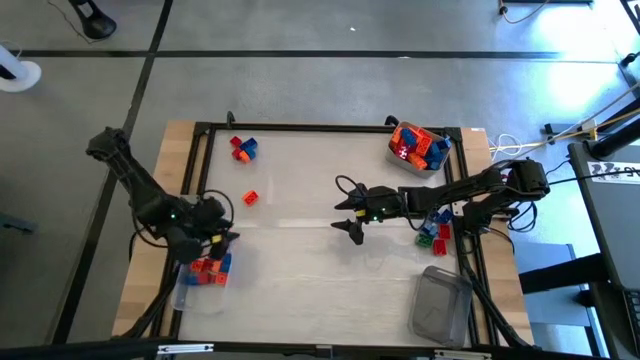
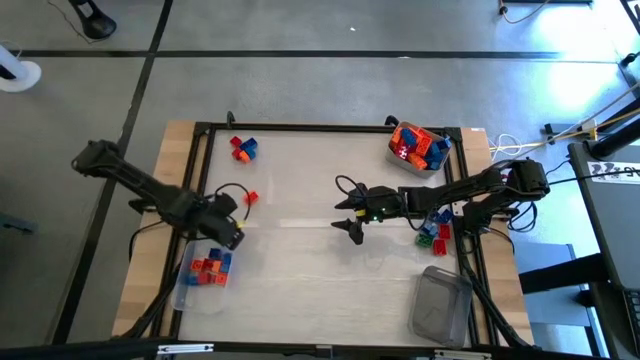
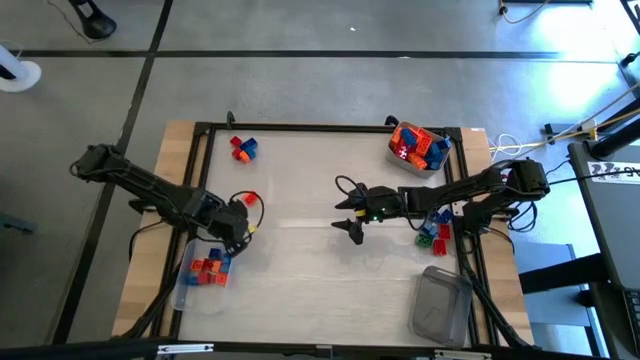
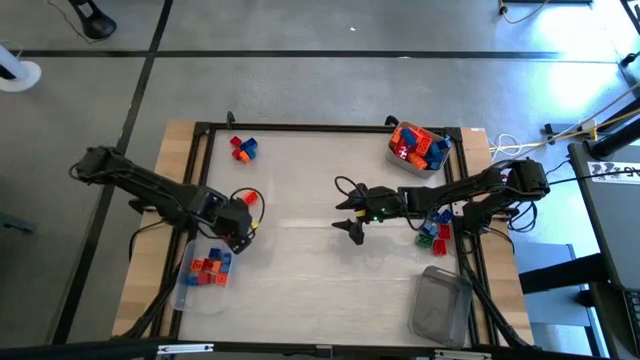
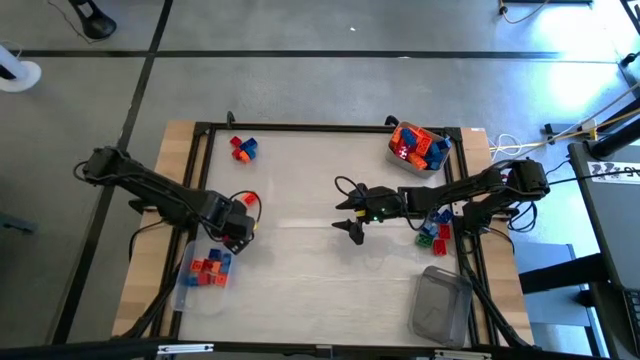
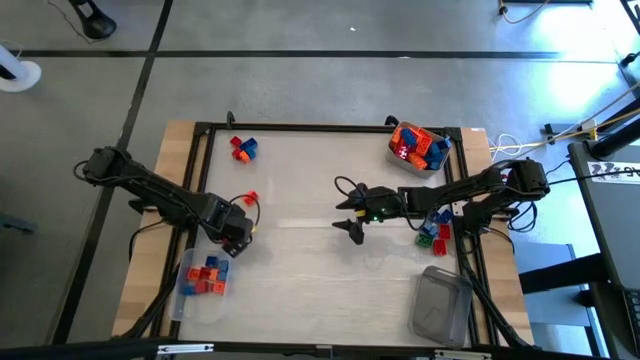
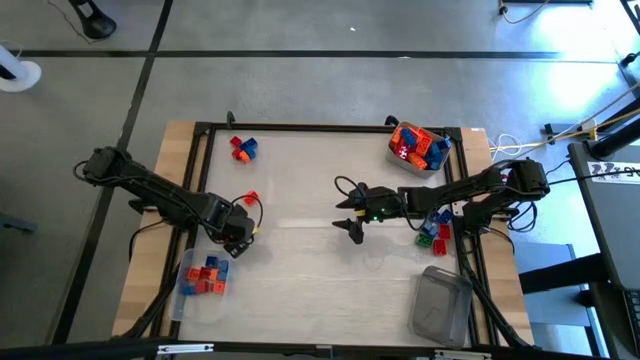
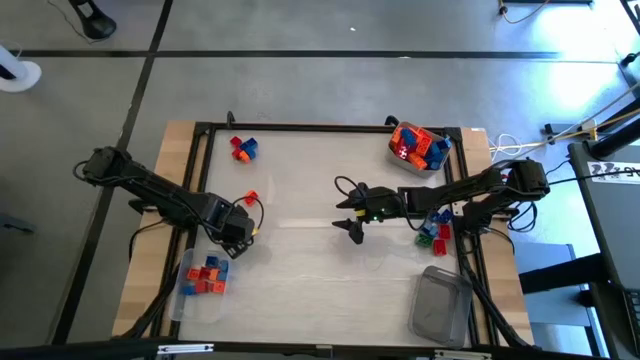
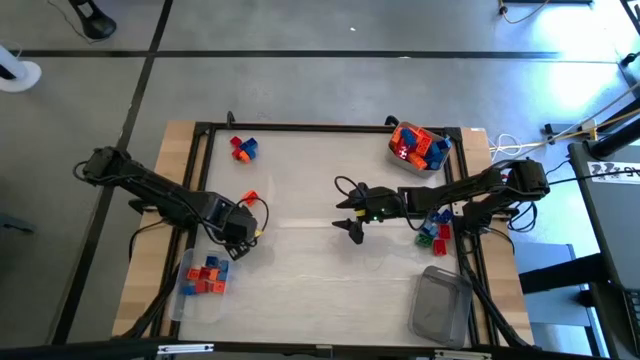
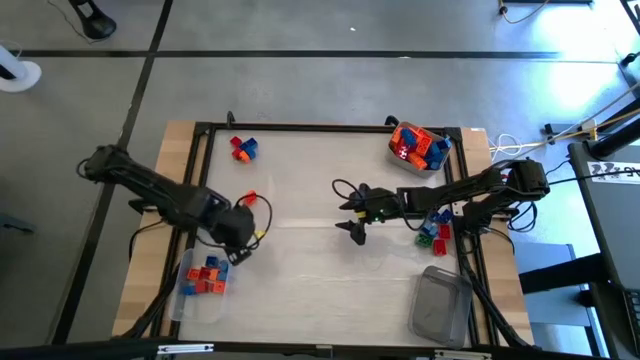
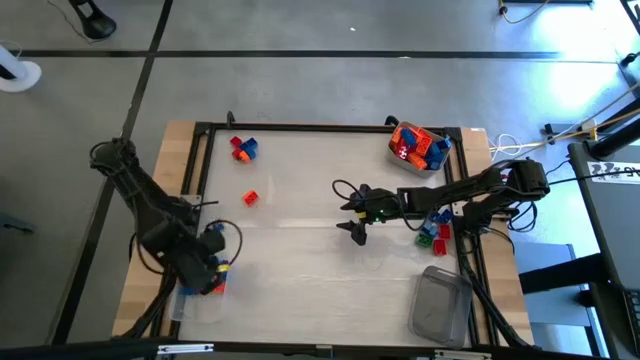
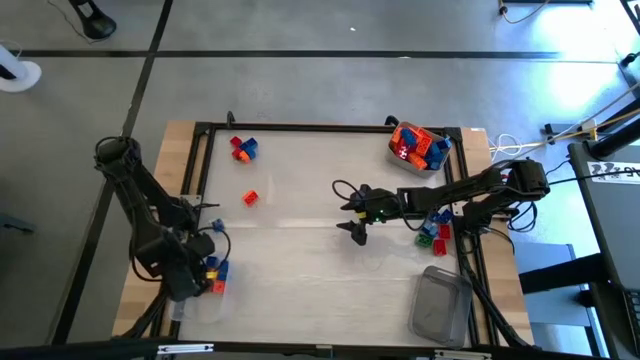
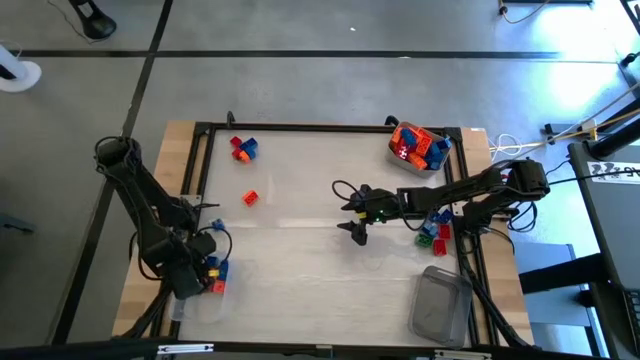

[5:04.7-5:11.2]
Task: Sort blocks by size
Put the red game piece into the transparent bin

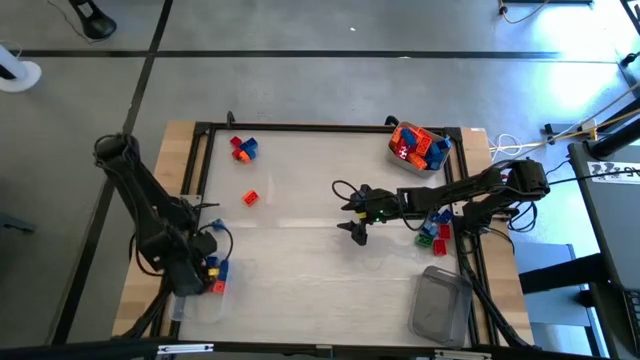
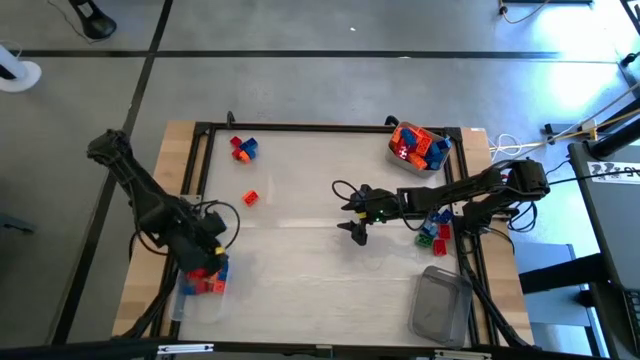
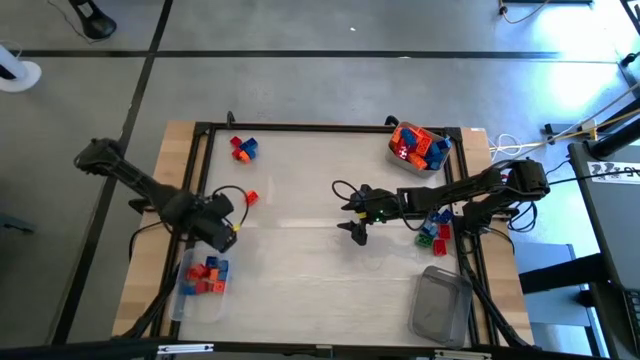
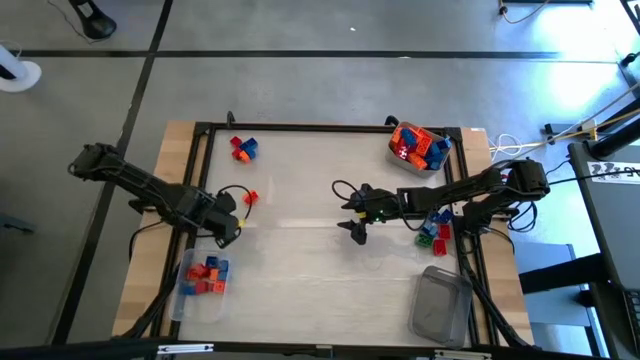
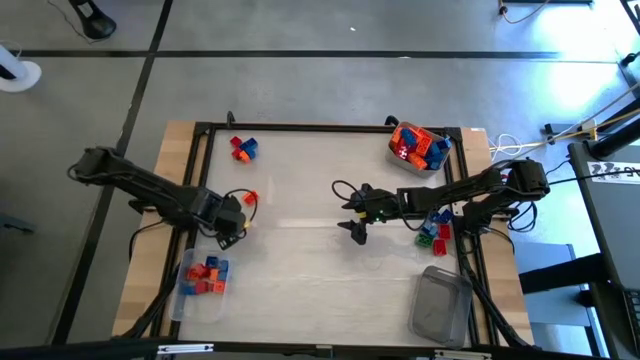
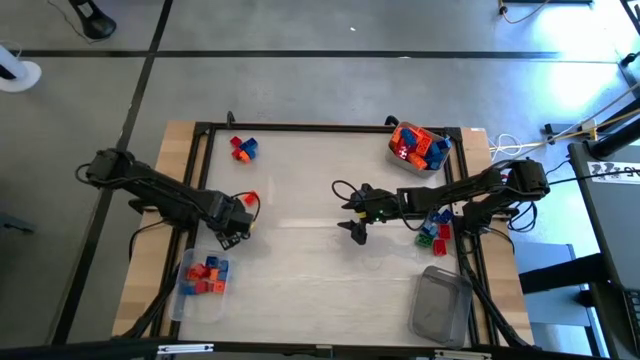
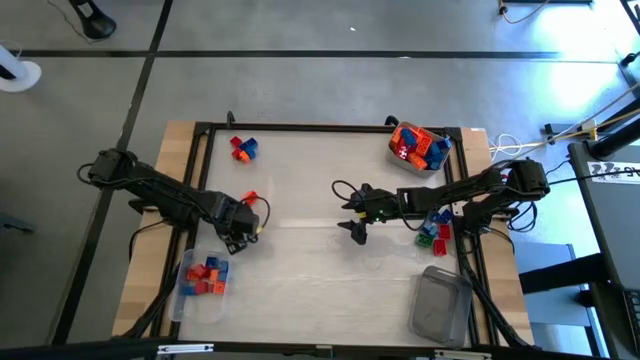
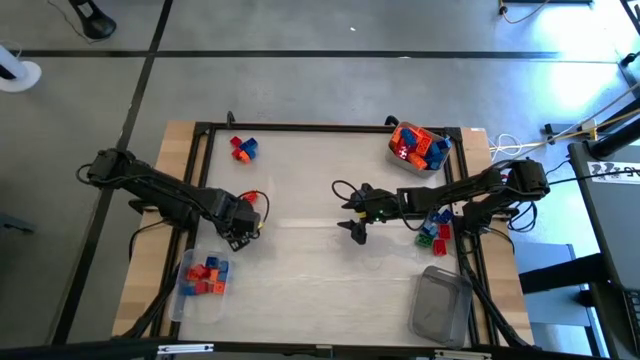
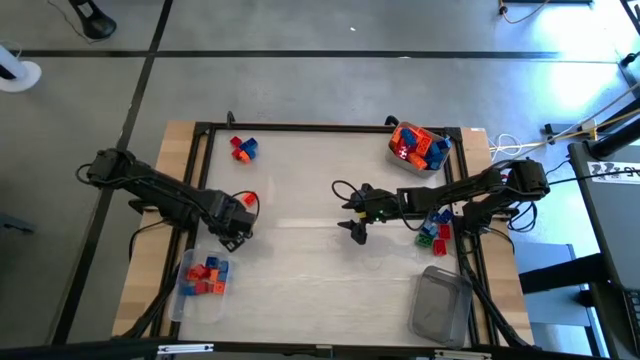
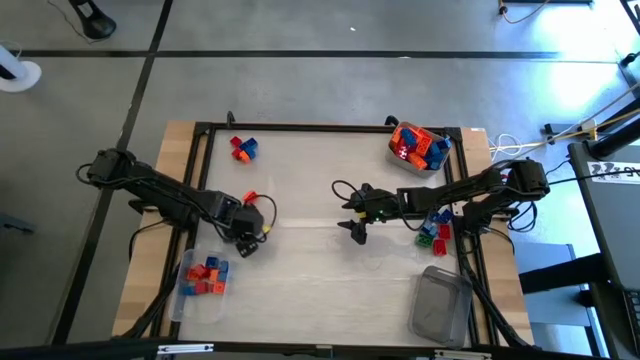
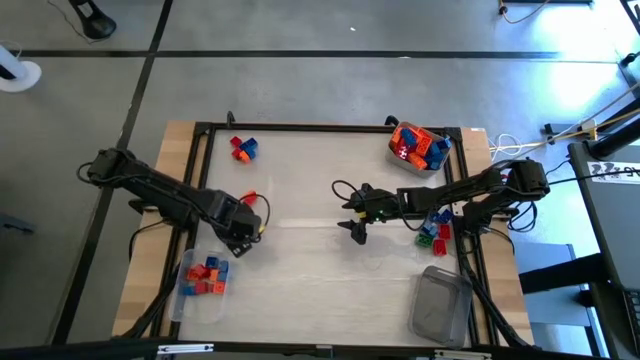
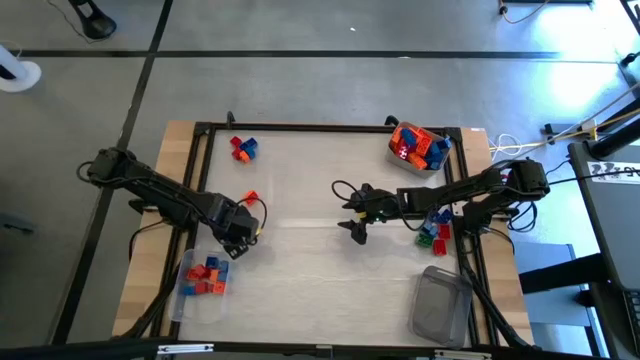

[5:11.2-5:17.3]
Put the blue game piece into the transparent bin

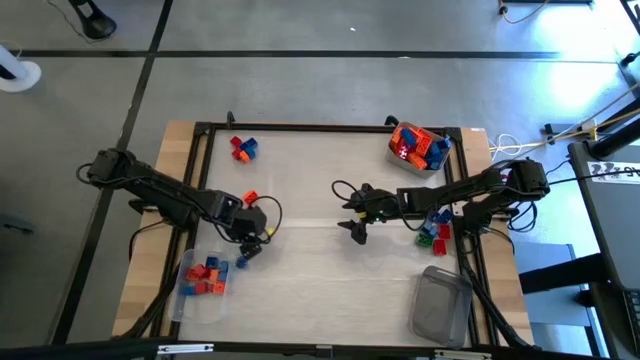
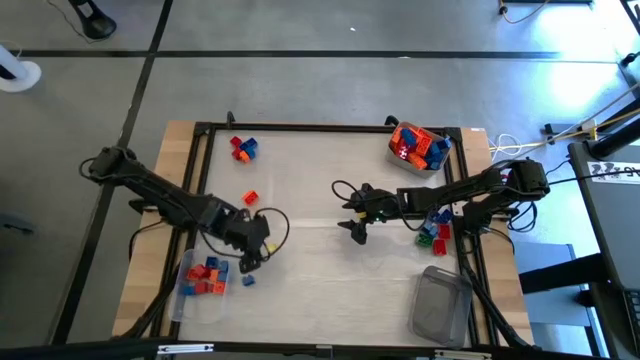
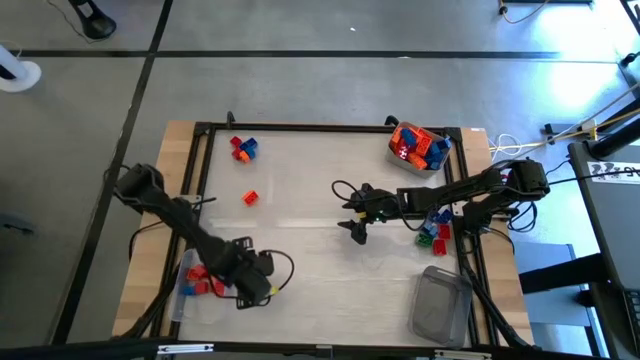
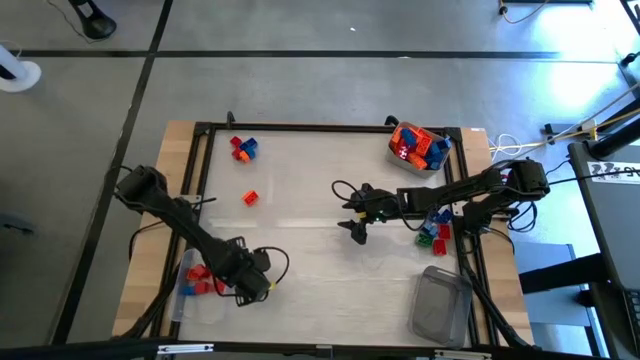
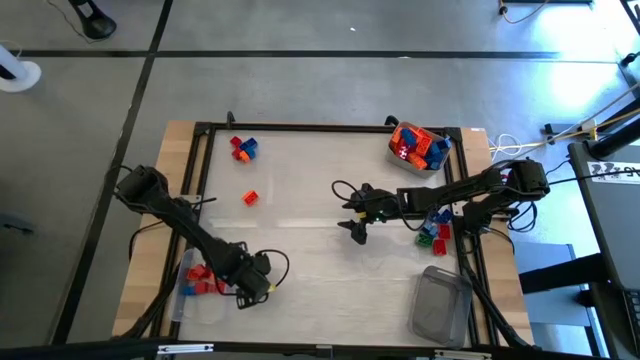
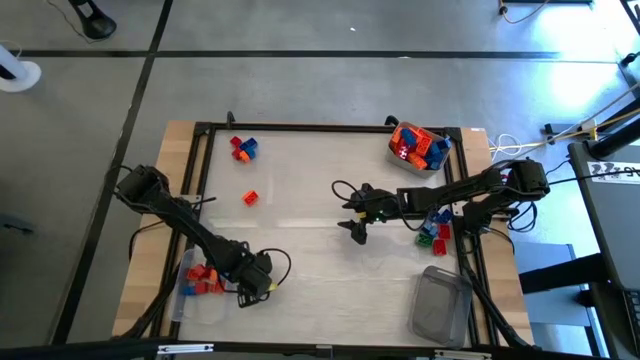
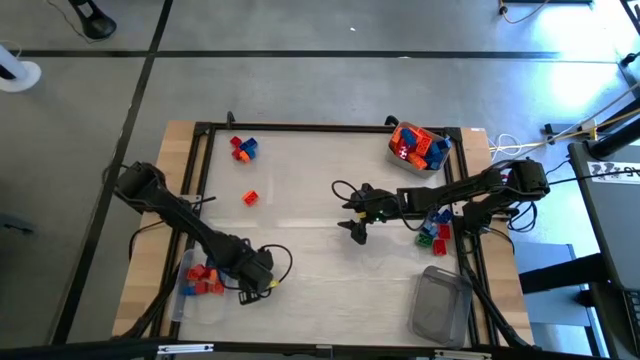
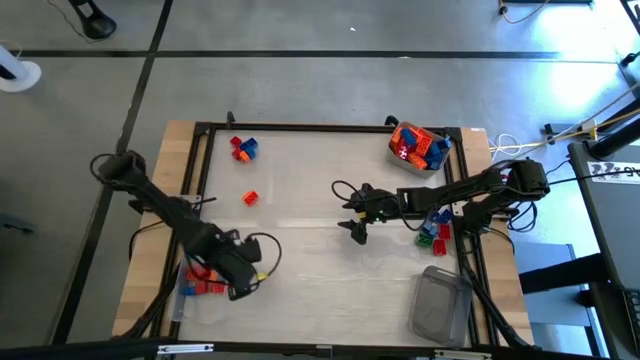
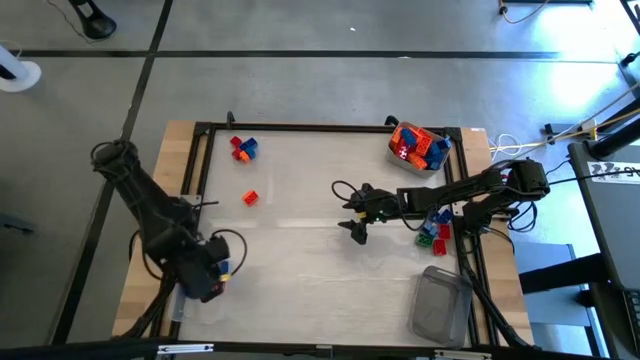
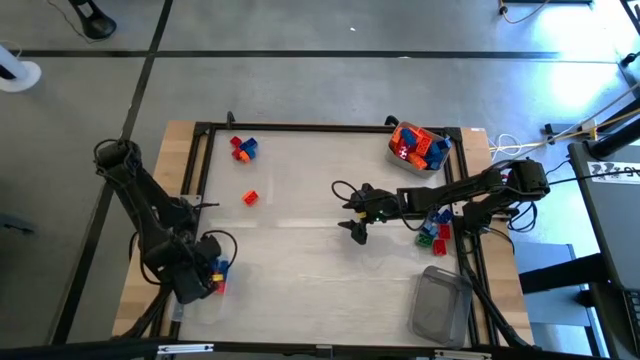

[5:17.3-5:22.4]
Put the blue game piece into the transparent bin

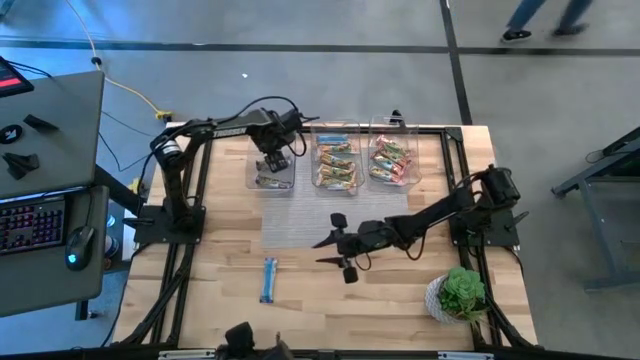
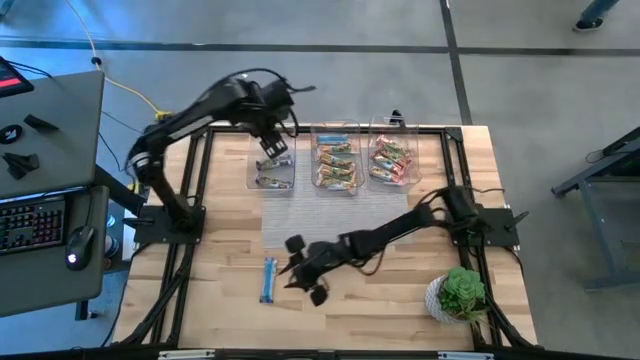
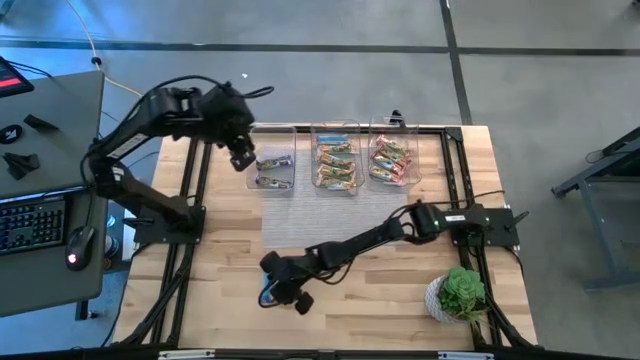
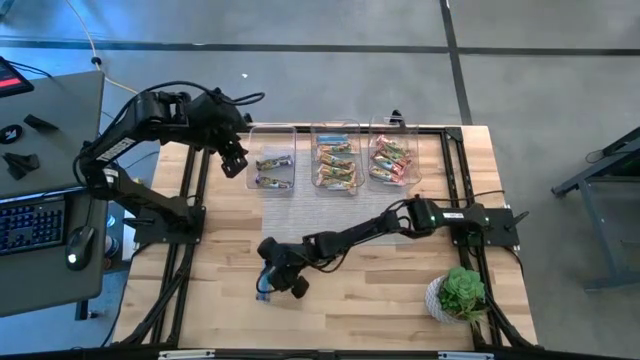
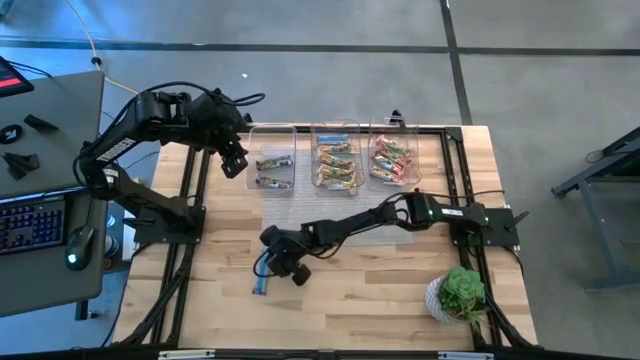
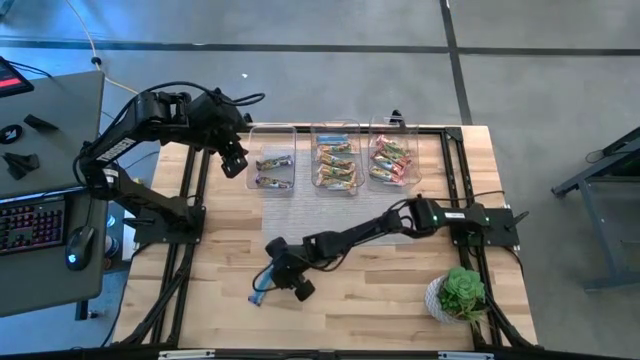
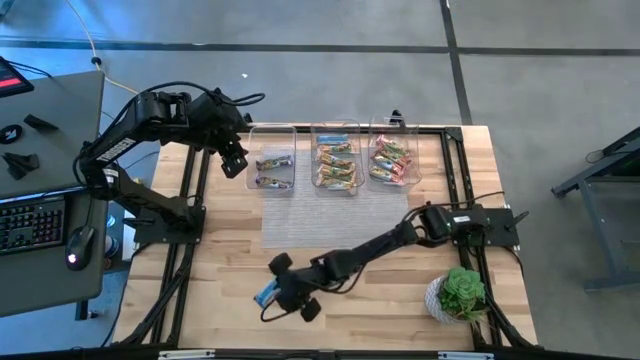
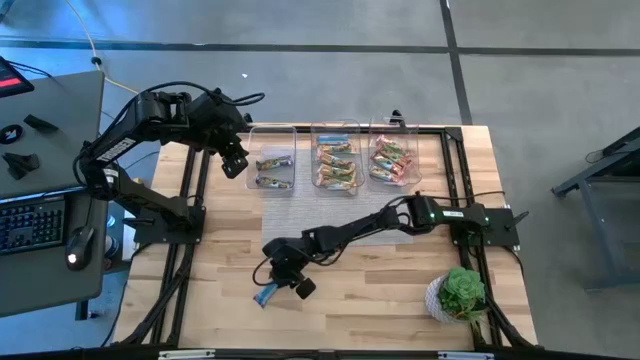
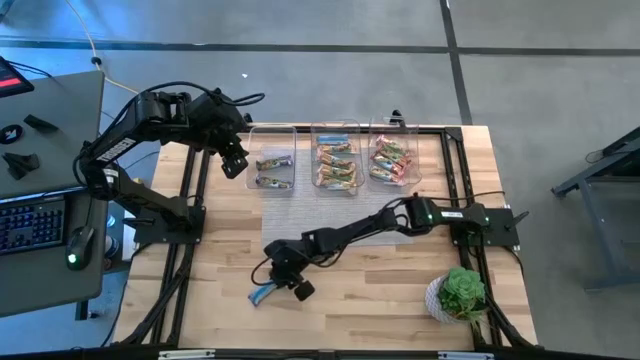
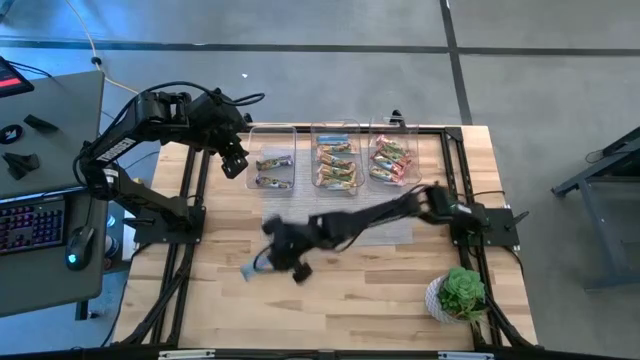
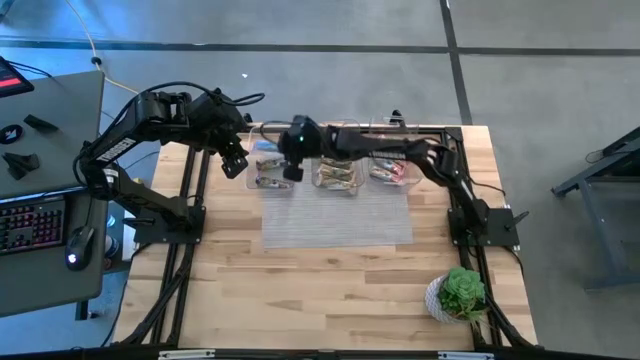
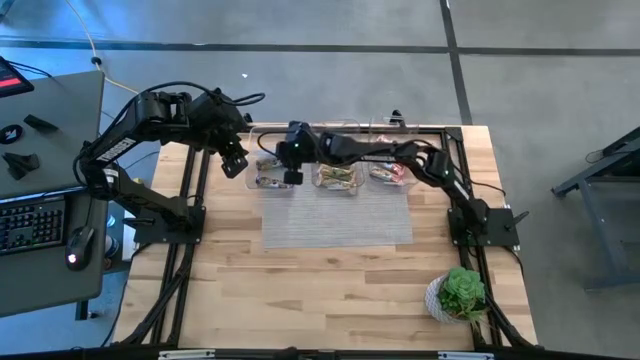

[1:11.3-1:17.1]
Task: Pick and place Granola Bars by type
Put the blue granola bar into the left transparent bin
